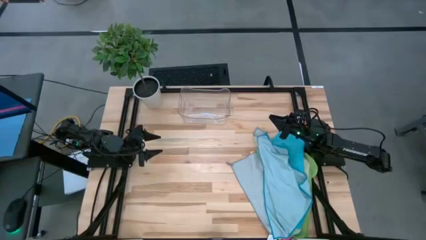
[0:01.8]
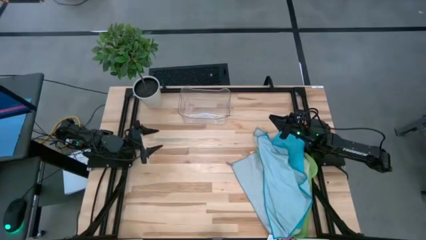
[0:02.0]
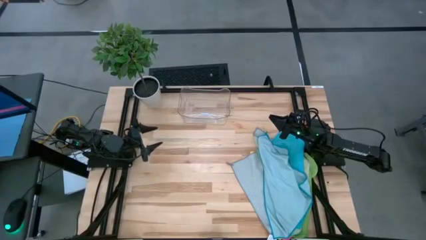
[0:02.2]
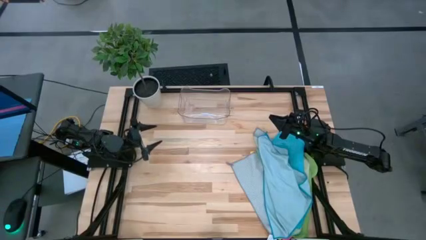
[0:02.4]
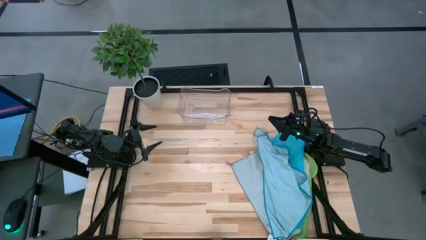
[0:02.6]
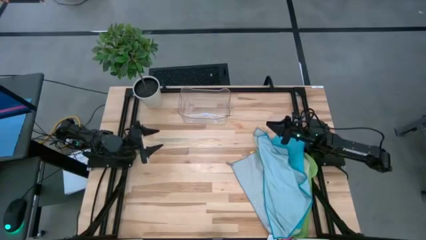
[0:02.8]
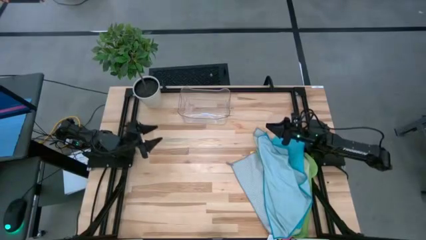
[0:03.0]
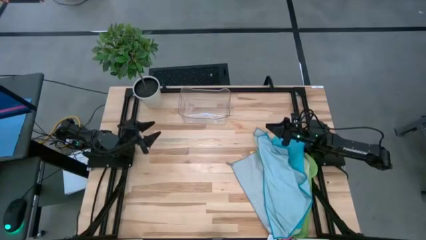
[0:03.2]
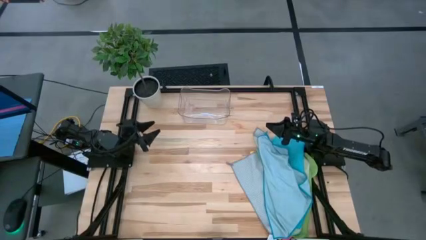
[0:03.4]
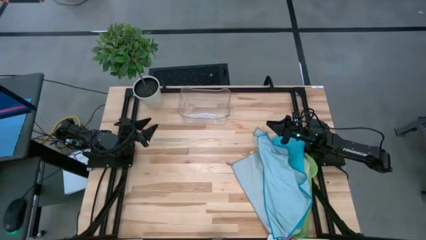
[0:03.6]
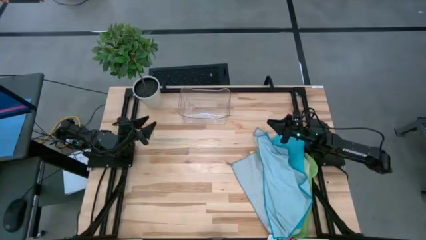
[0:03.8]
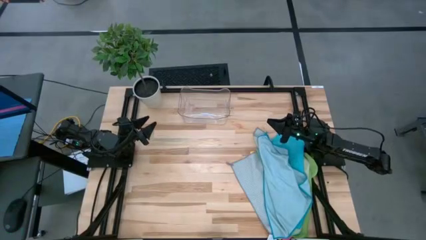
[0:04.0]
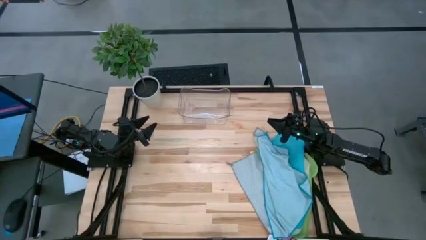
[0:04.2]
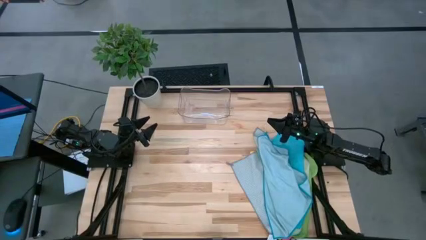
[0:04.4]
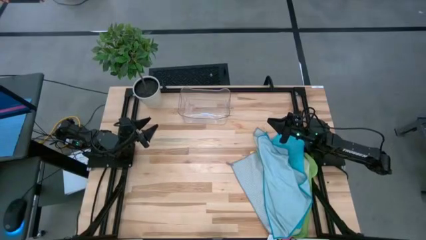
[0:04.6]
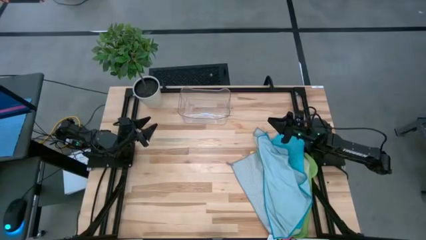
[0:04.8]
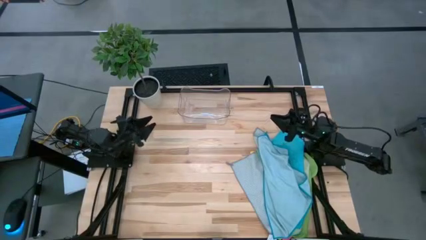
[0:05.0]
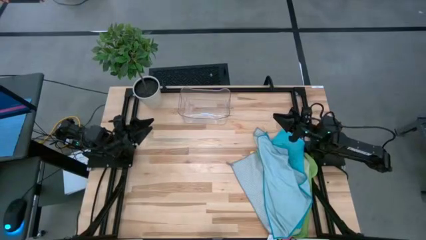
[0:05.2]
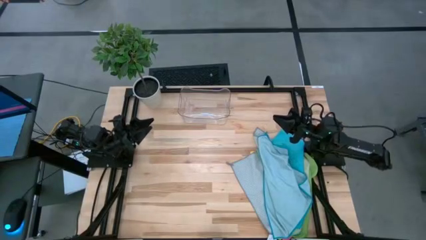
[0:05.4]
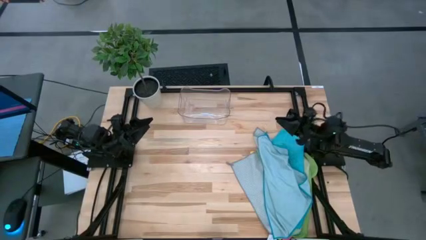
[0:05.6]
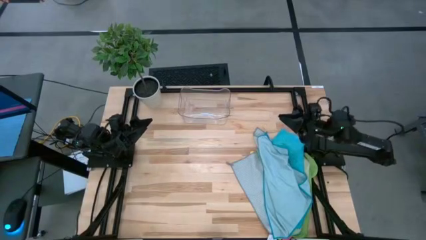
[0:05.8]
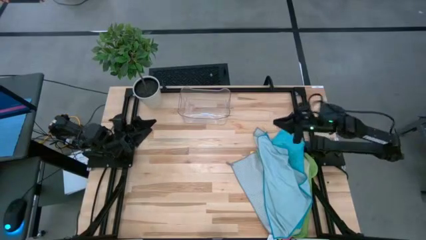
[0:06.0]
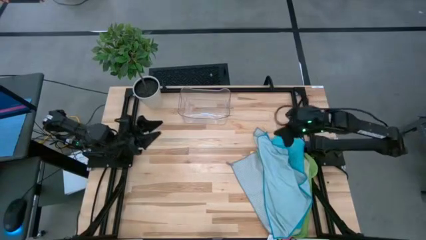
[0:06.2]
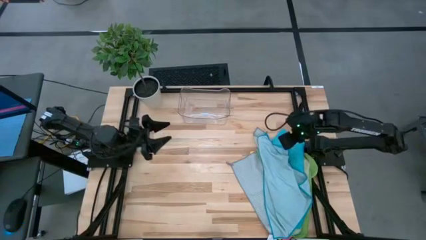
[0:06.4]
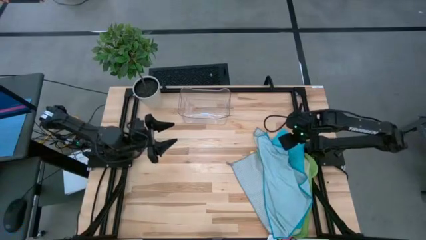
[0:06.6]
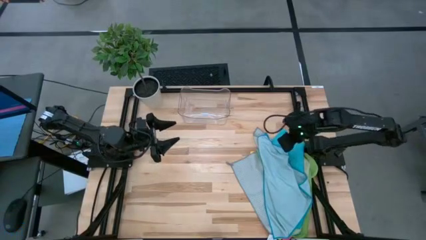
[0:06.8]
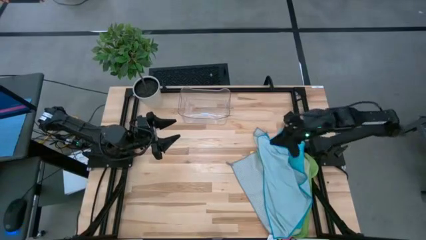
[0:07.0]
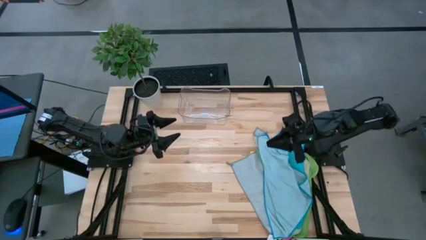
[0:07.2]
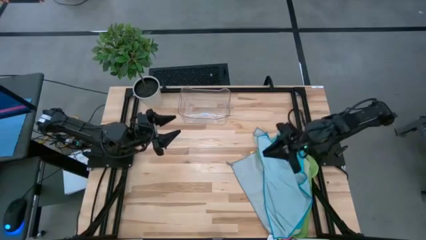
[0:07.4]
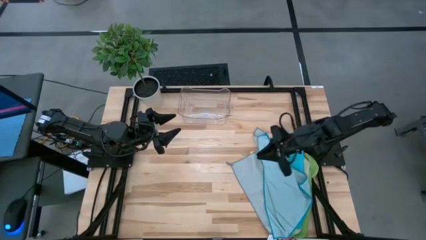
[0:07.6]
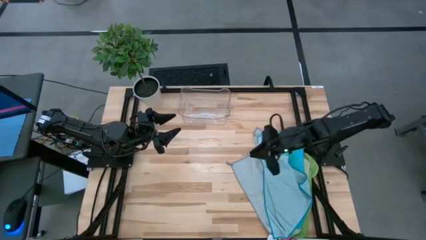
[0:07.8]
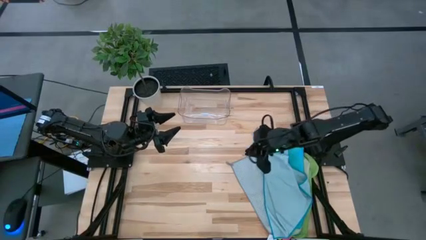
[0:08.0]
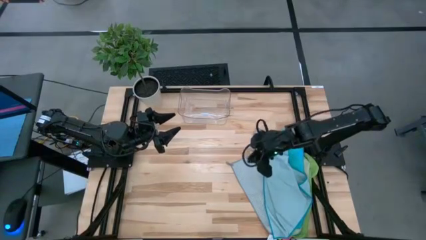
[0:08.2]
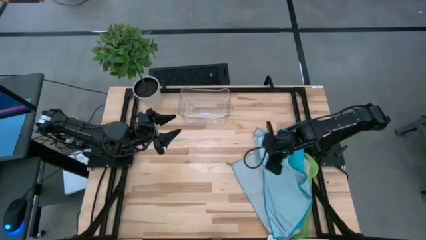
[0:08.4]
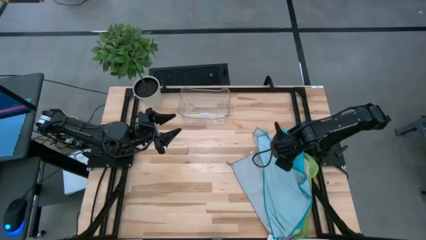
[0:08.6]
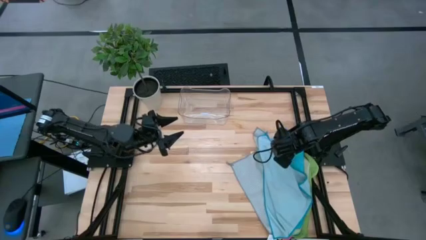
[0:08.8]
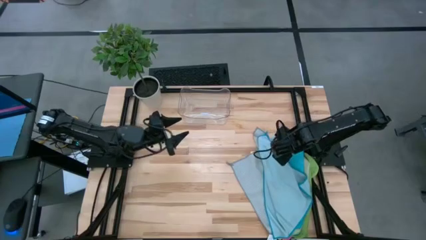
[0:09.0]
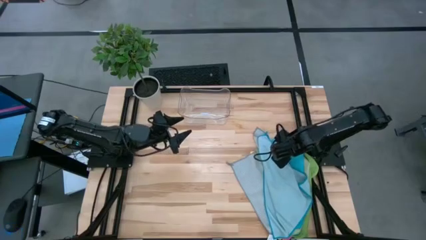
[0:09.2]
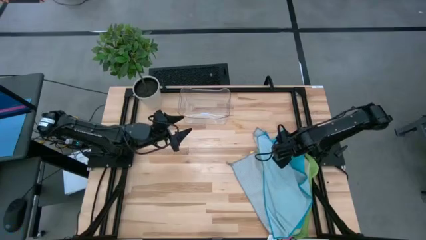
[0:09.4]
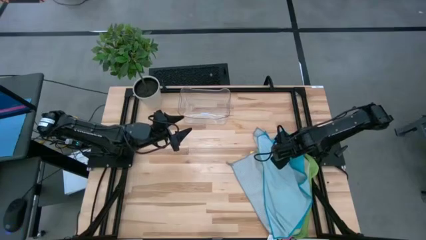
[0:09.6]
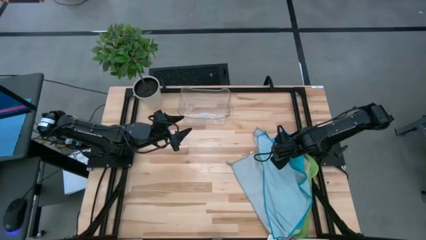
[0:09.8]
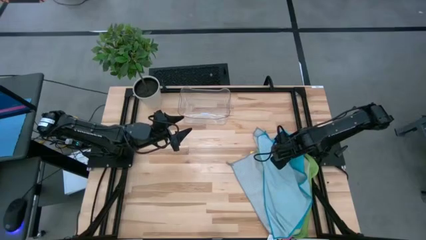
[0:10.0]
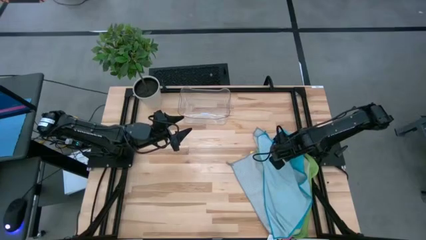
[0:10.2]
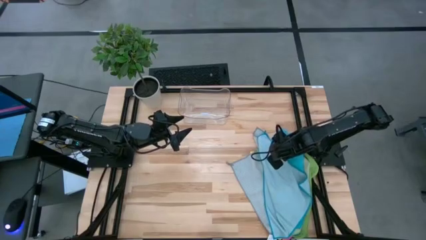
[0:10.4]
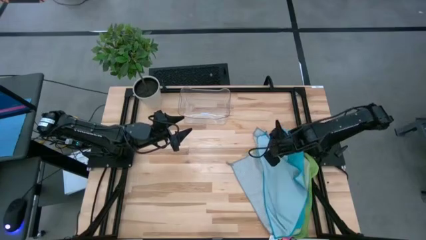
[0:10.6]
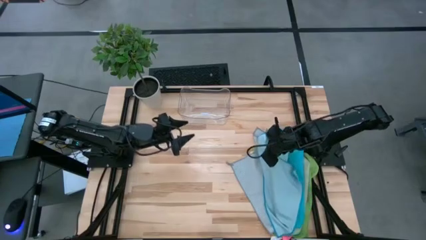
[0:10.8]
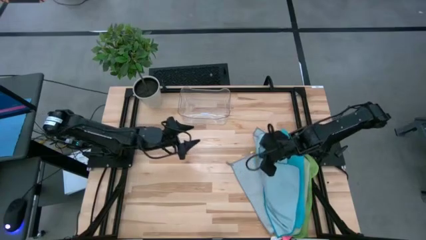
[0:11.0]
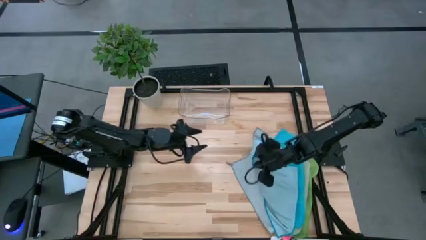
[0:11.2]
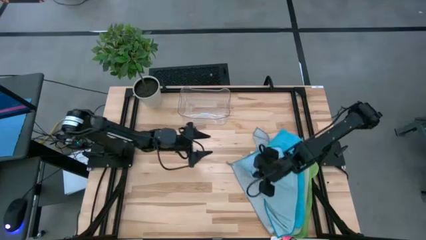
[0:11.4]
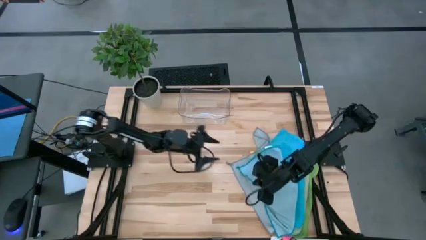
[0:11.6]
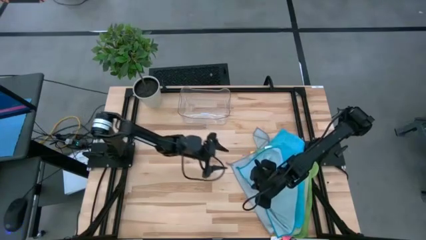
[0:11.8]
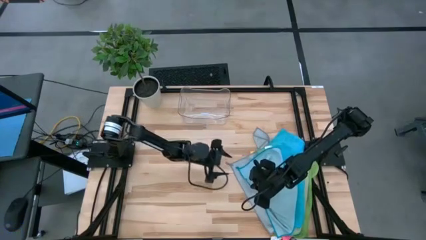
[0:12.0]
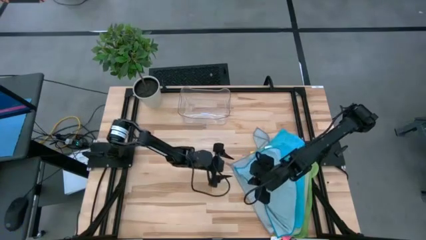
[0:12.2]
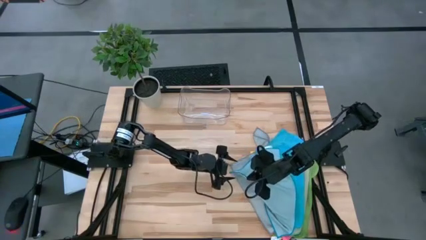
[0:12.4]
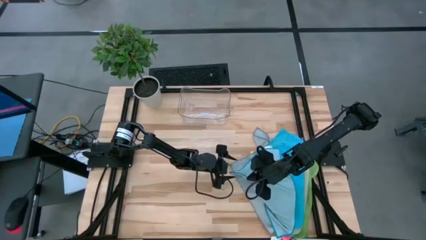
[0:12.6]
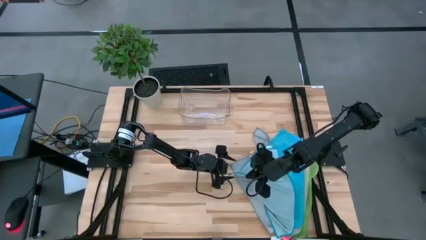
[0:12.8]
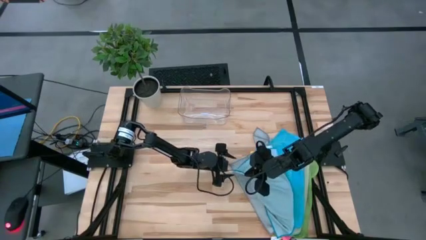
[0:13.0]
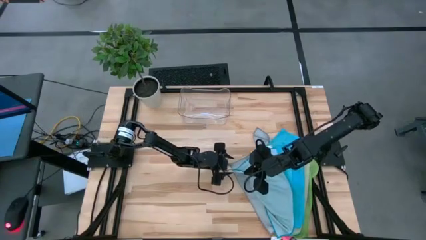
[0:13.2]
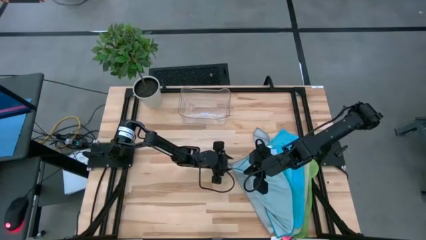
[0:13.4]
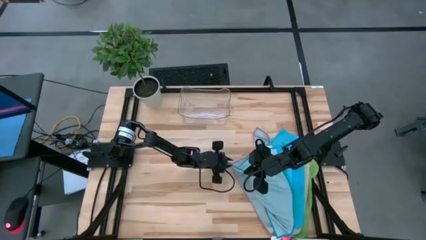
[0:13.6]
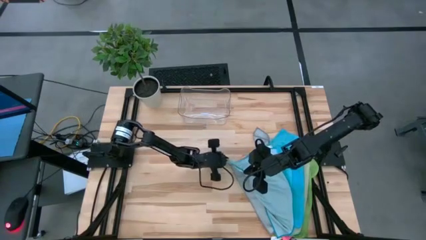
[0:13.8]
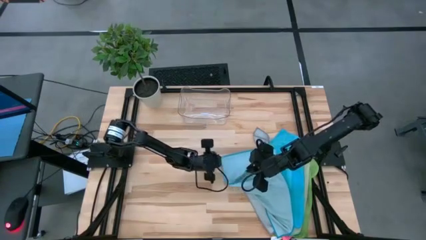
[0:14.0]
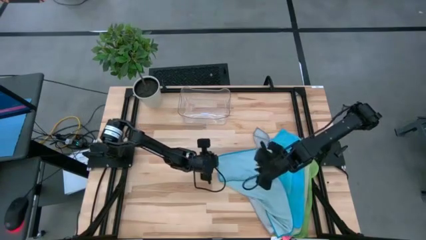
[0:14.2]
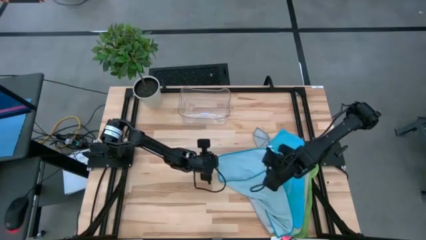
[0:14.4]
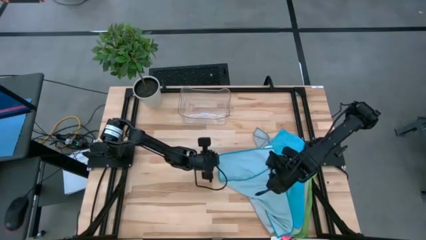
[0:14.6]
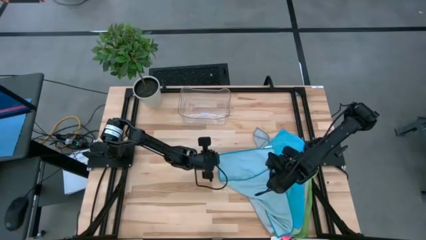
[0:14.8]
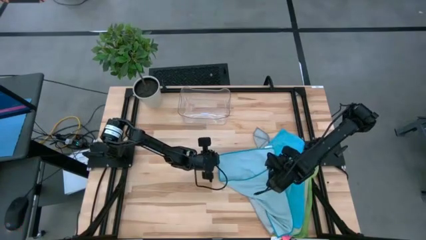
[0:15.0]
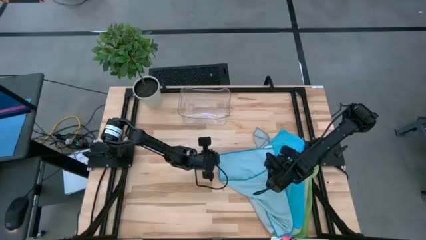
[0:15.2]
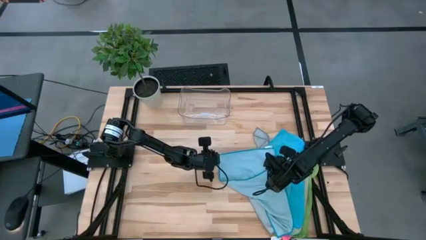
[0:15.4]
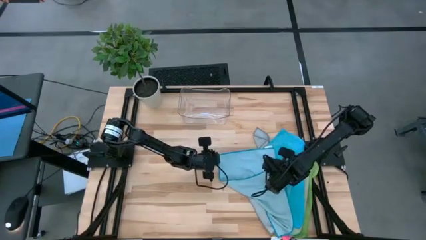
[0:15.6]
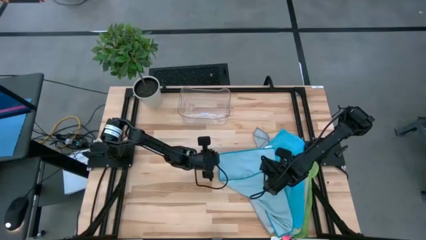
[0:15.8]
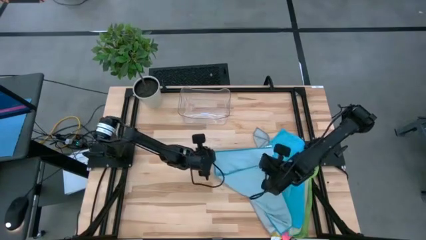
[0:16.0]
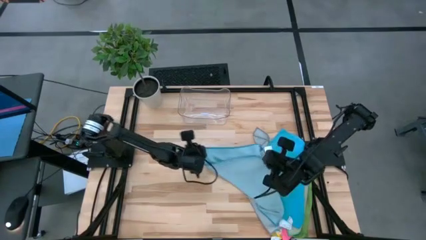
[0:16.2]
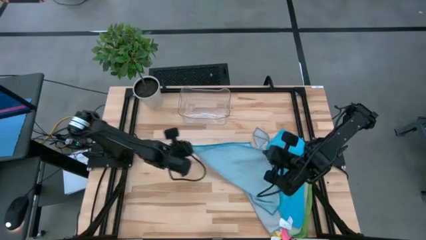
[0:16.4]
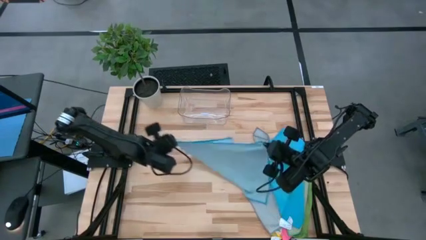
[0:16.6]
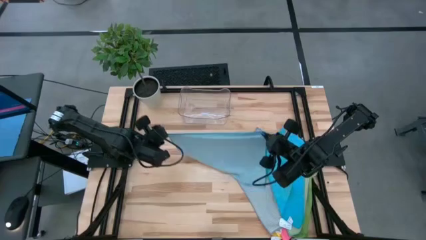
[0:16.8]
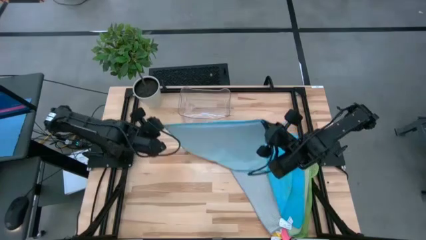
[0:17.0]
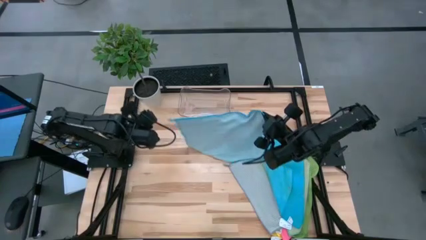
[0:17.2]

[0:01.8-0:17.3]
Task: Fold microfiber towels
Fold the light blue microfiber cloth
